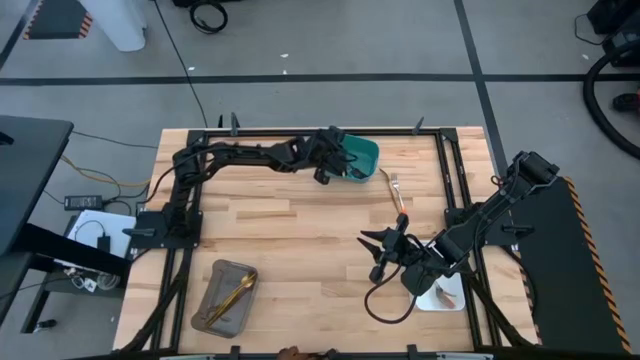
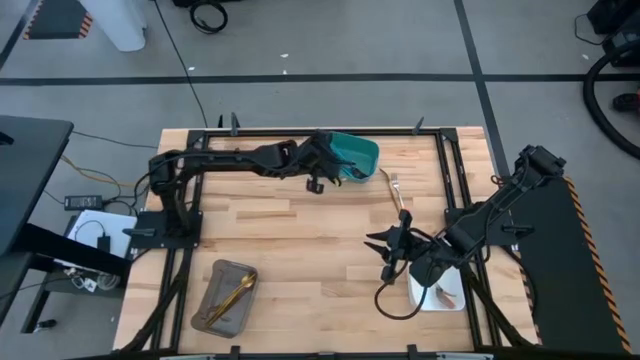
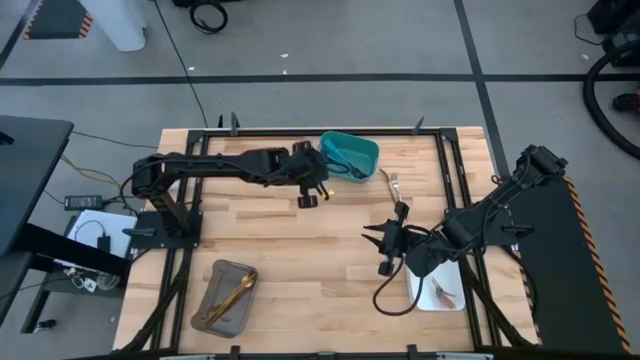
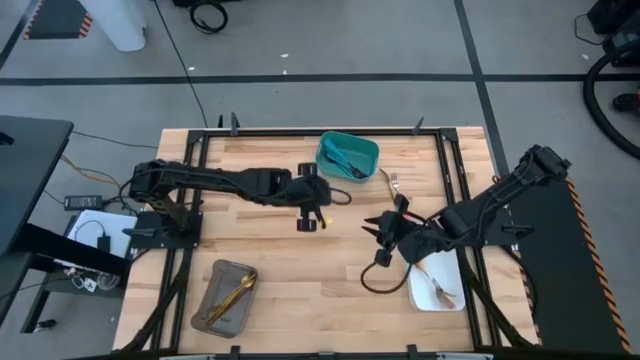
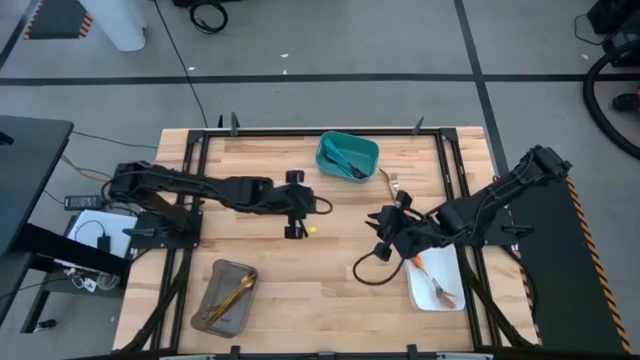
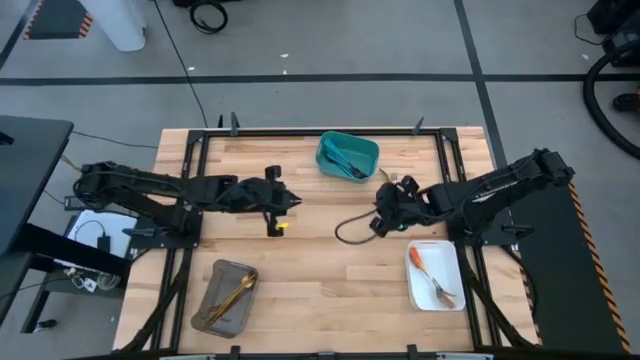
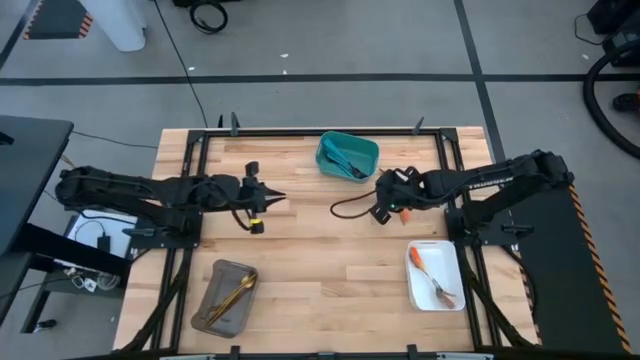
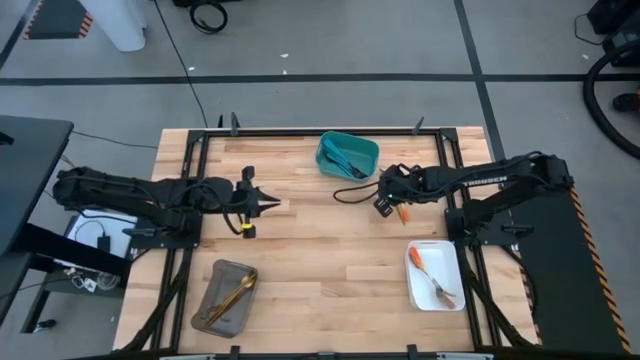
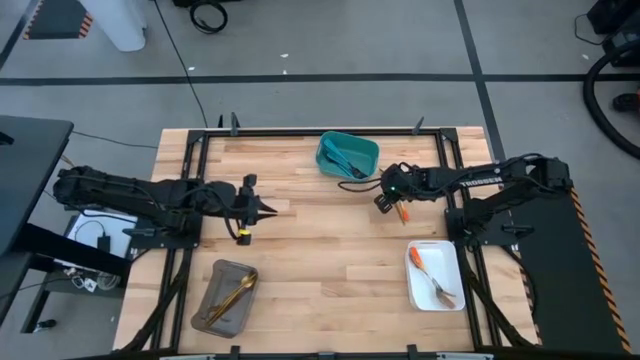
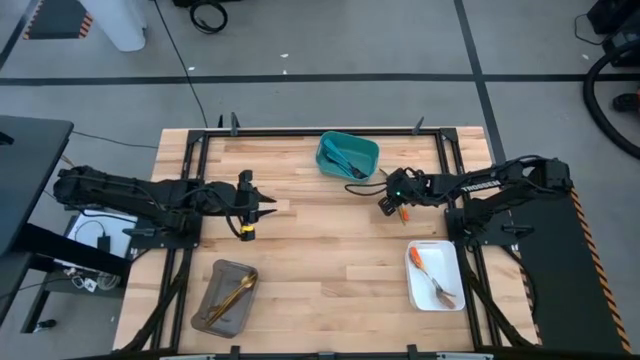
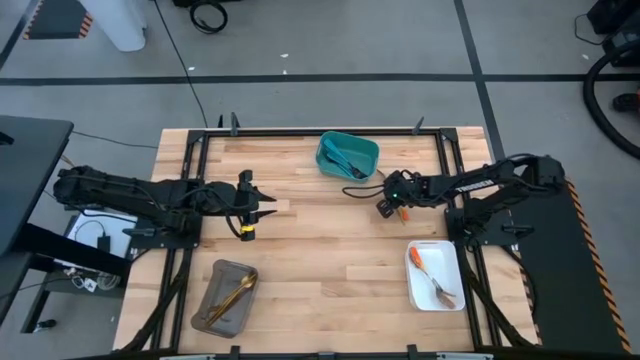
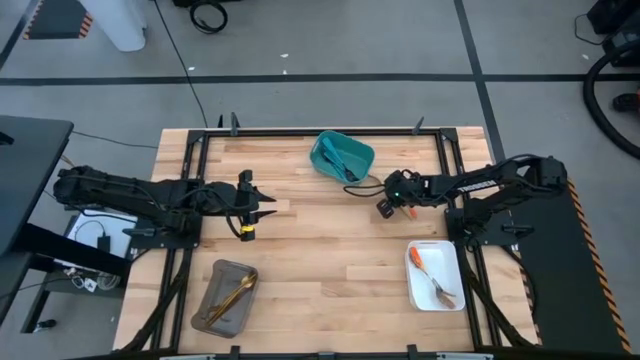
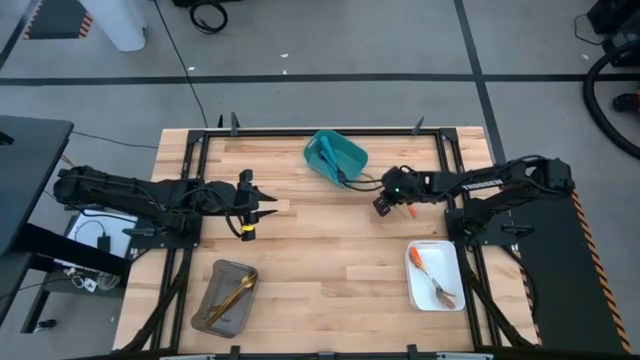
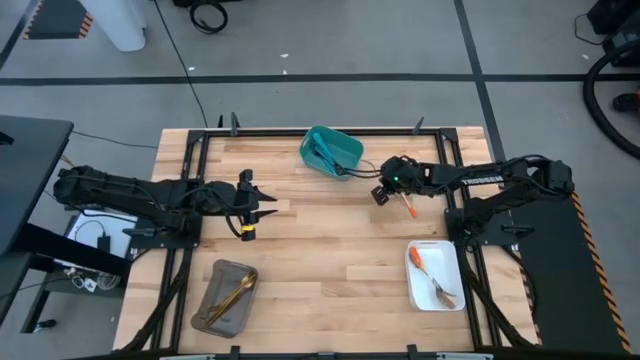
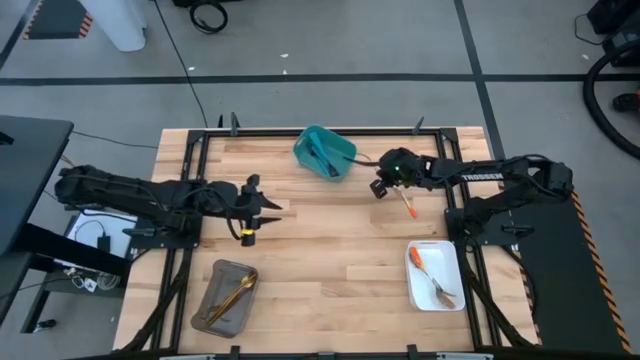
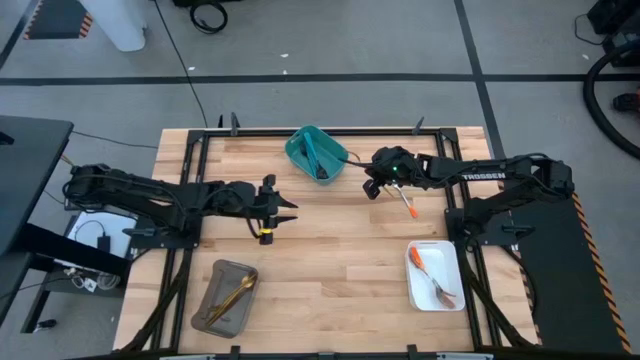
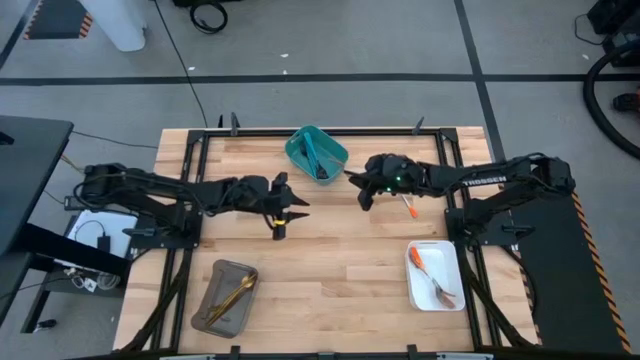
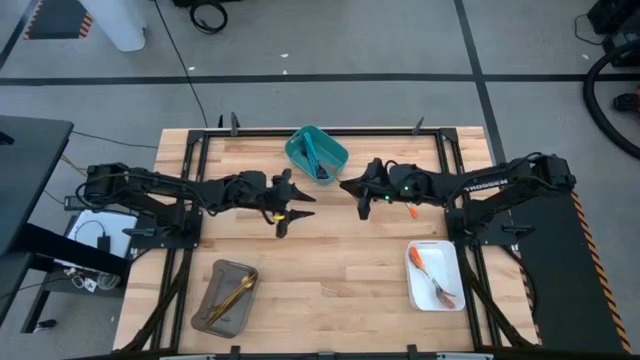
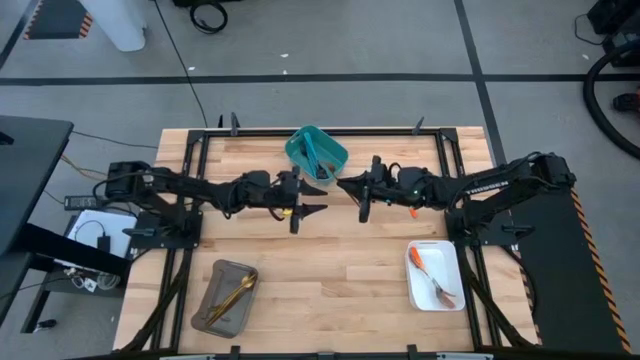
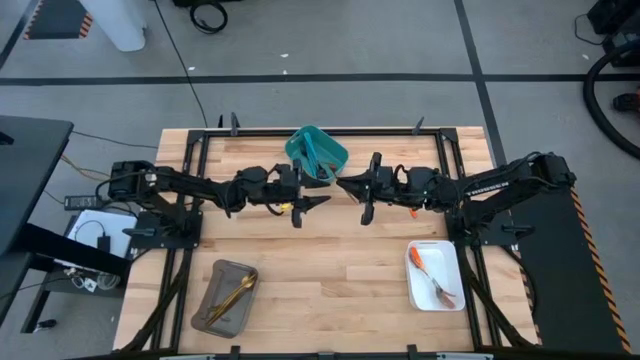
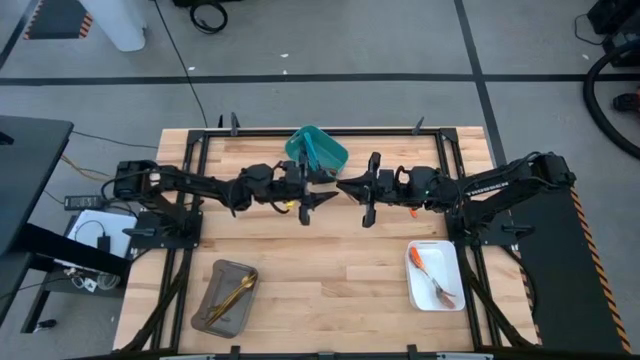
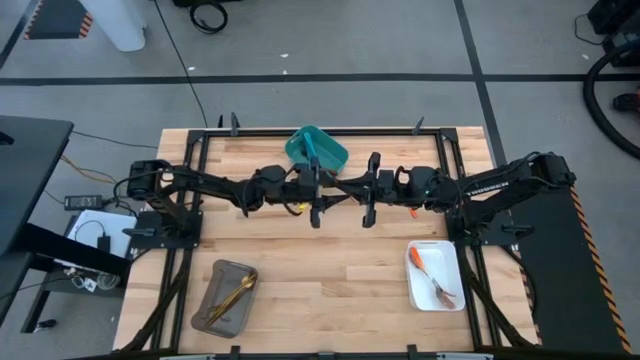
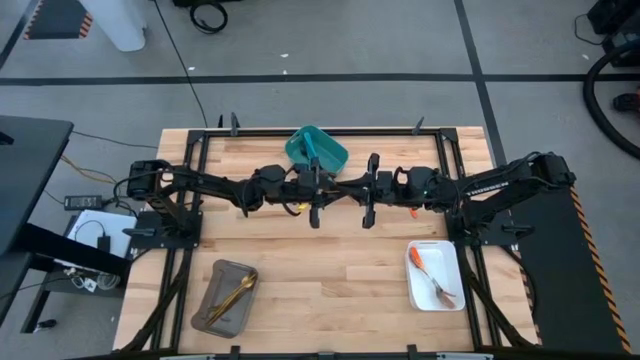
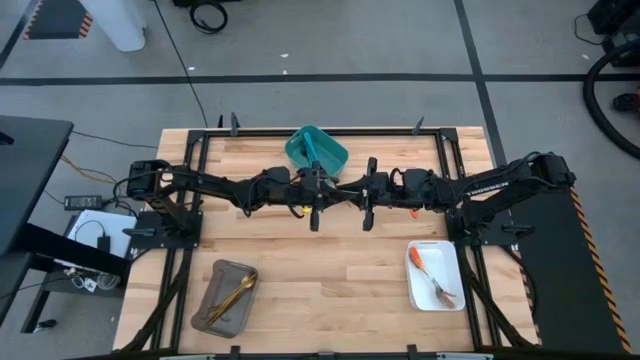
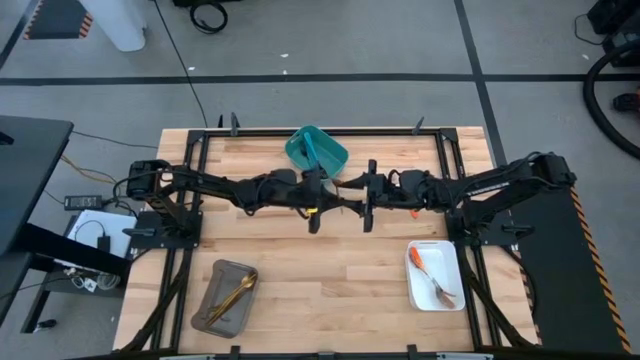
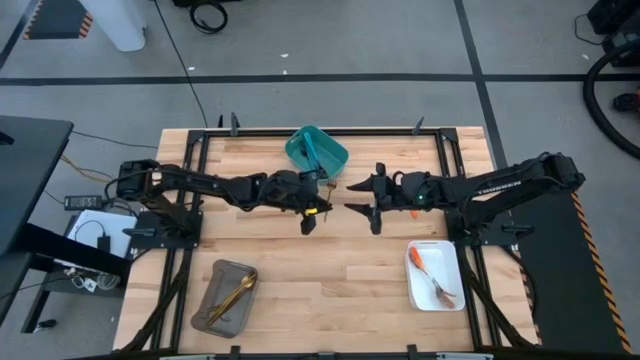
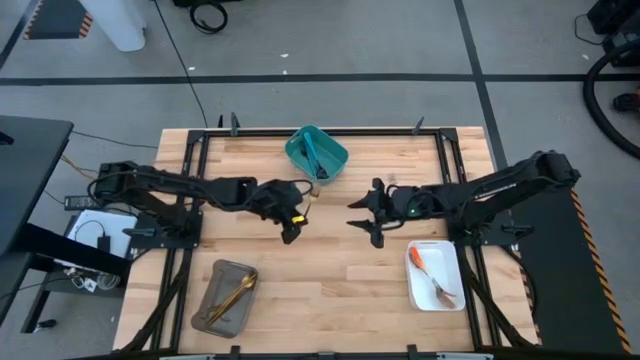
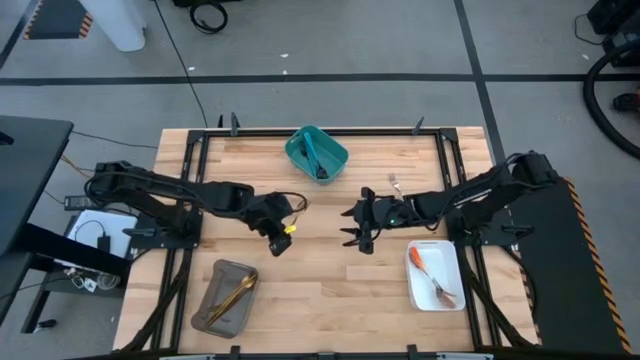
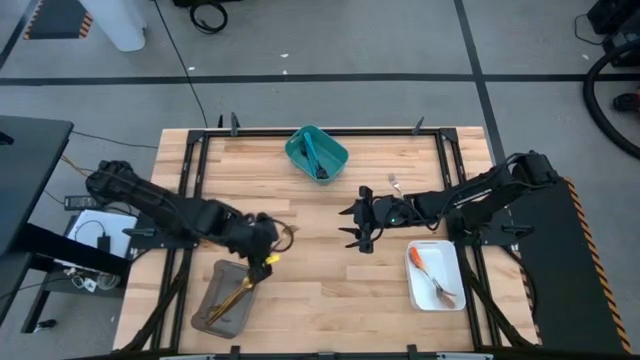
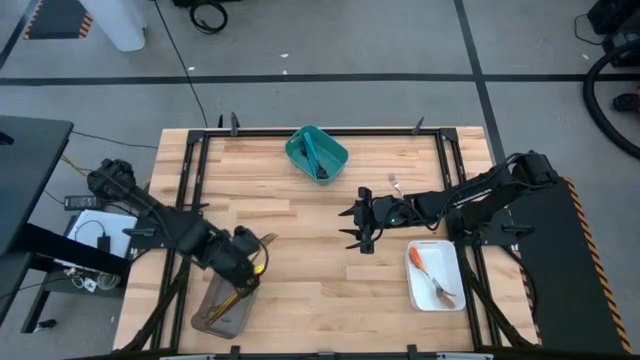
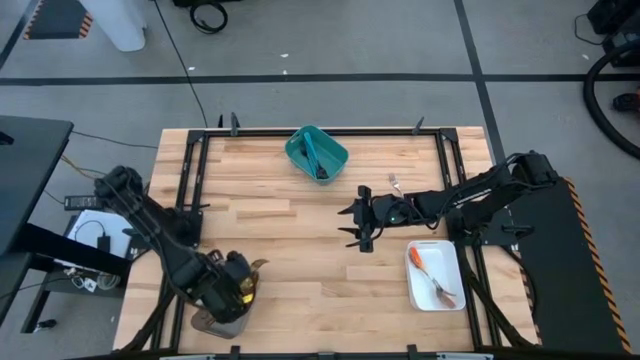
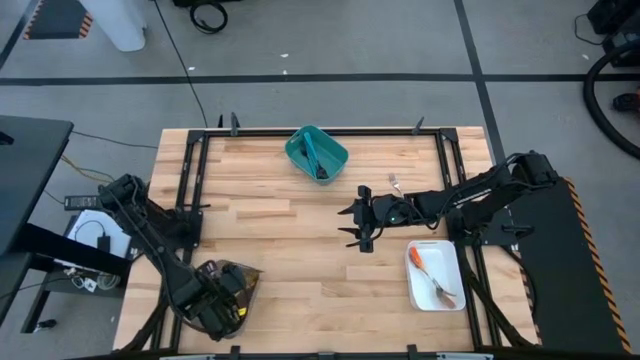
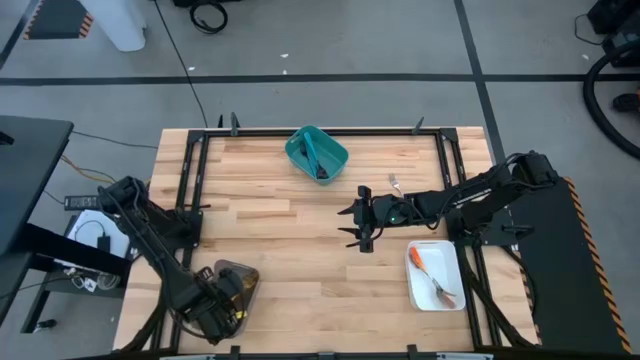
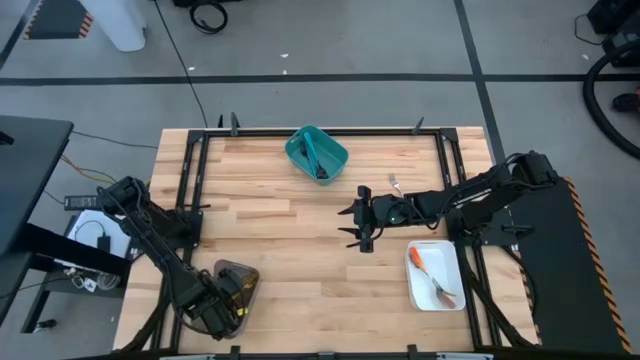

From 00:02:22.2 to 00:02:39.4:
Task: Sort silverware by color (type)
Put the gold fork into the black bin

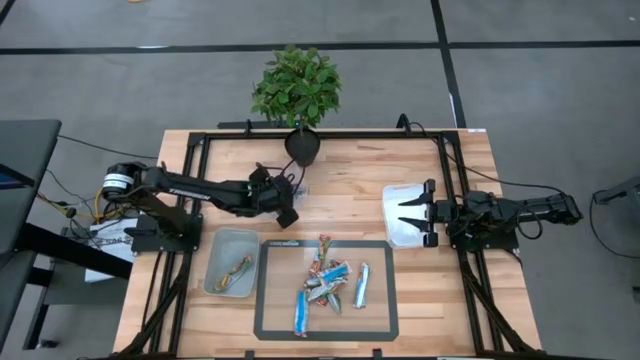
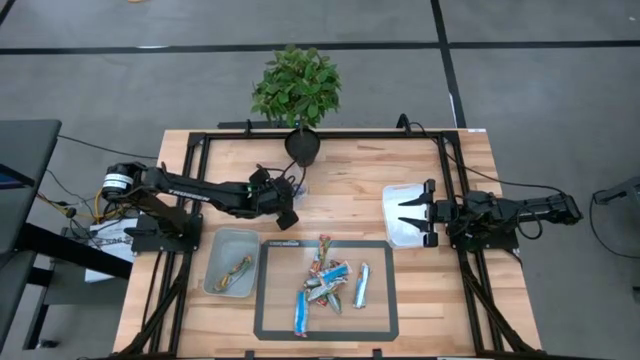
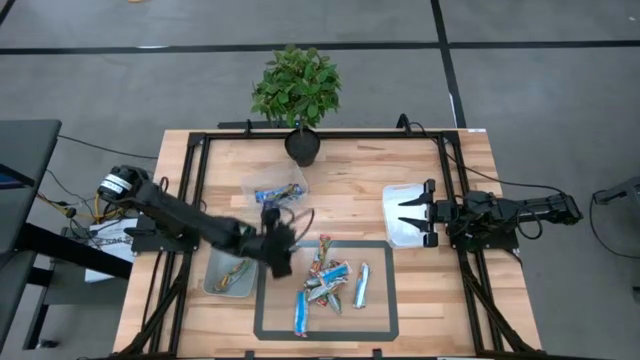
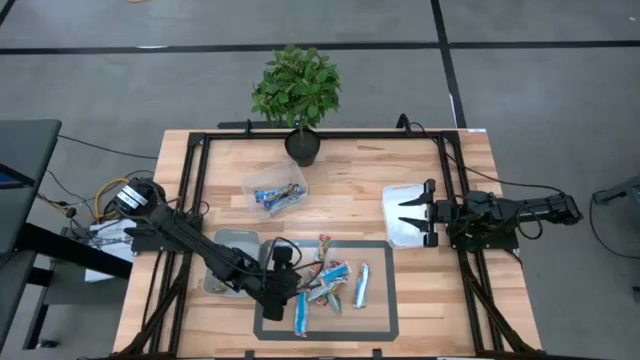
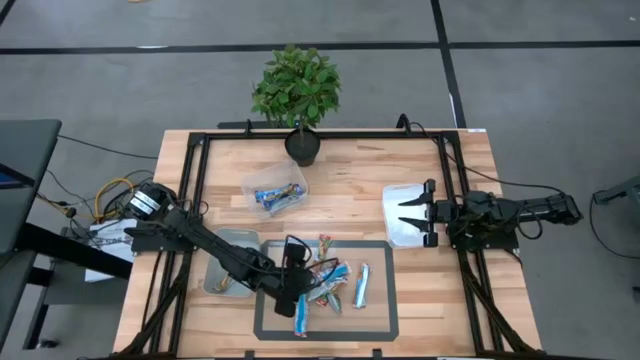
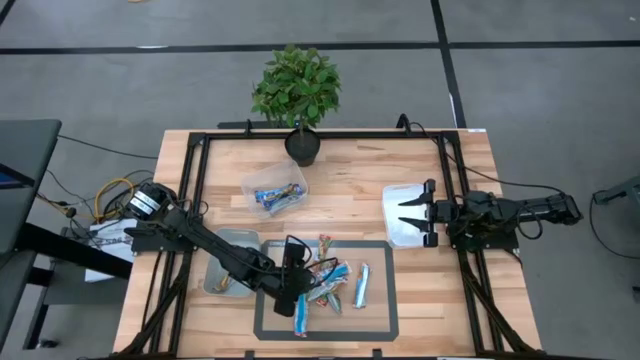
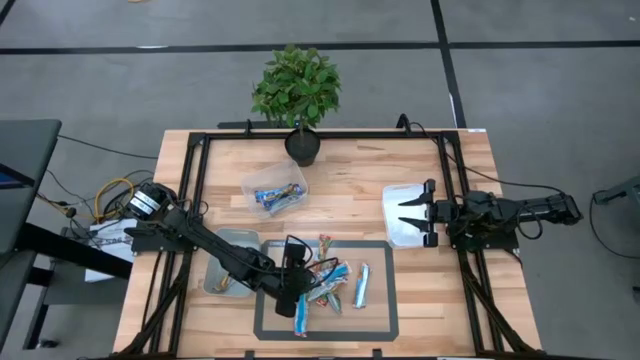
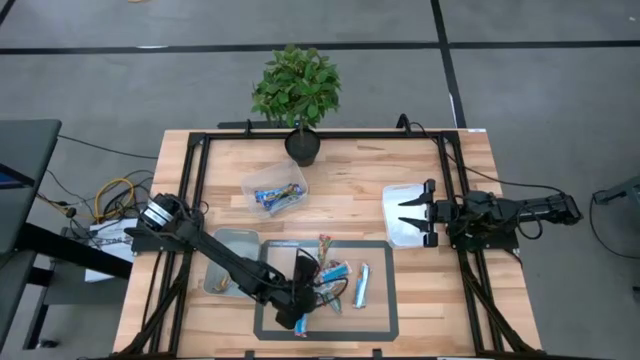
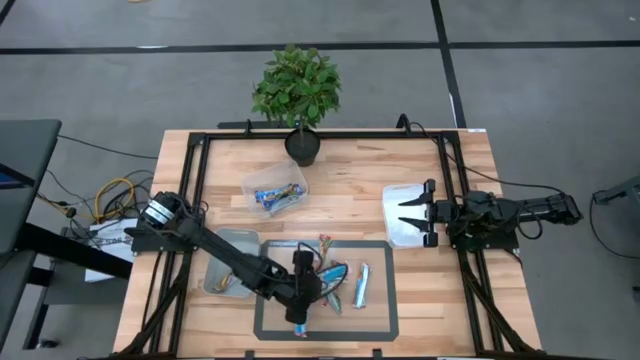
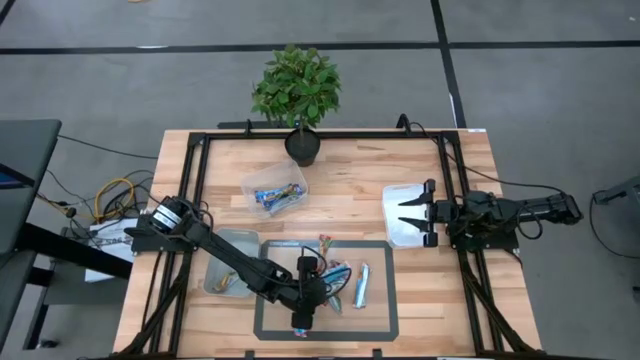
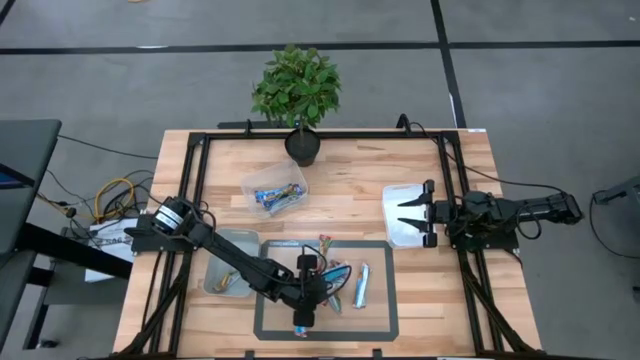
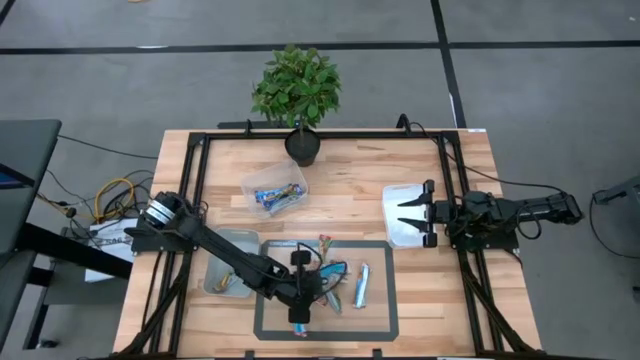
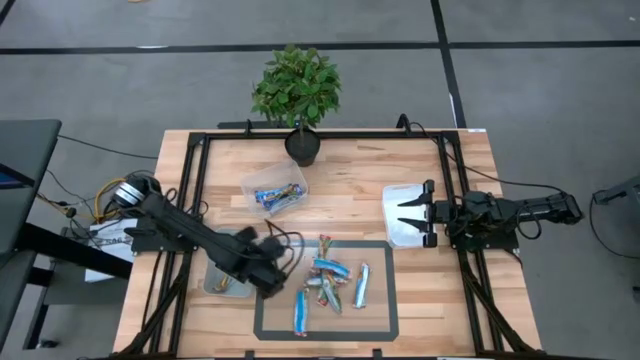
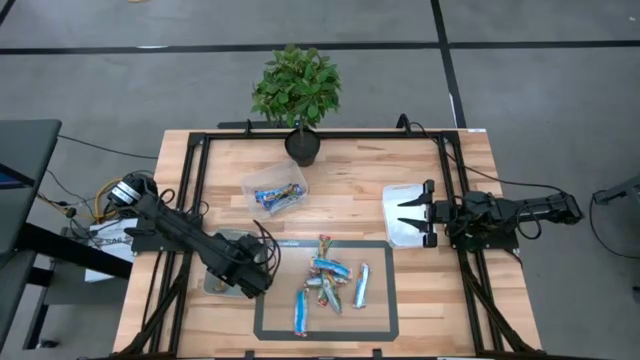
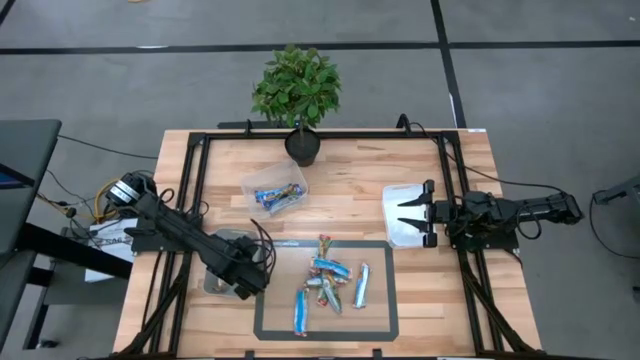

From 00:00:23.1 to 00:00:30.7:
Task: Pick and place Granola Bars by type
Put the yellow granola bar into the gray bin
